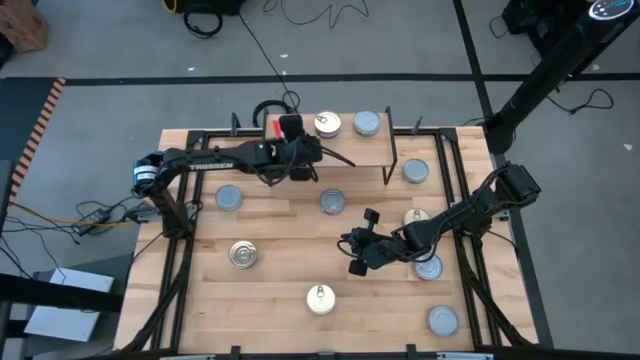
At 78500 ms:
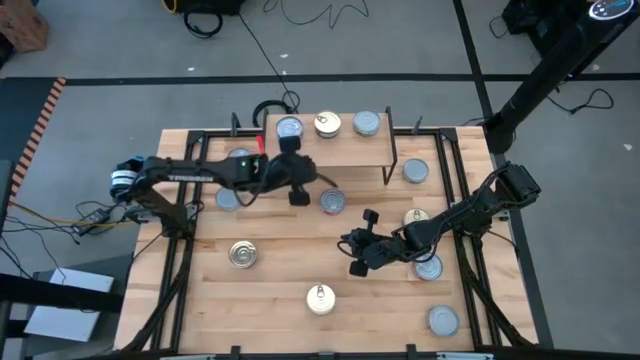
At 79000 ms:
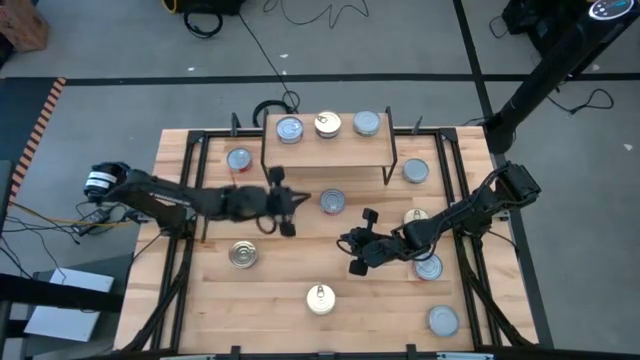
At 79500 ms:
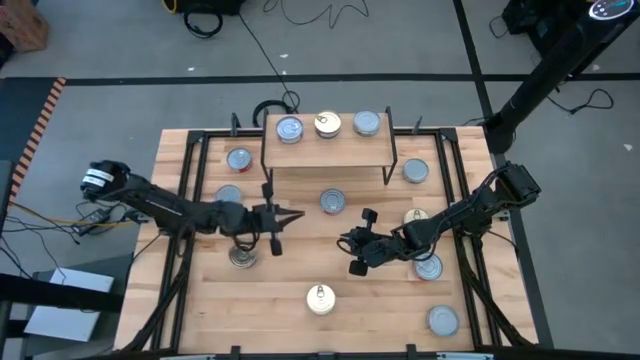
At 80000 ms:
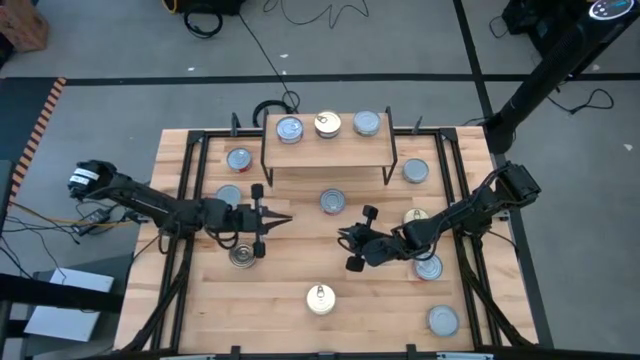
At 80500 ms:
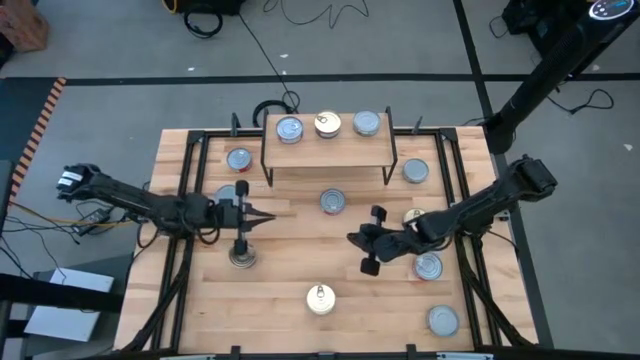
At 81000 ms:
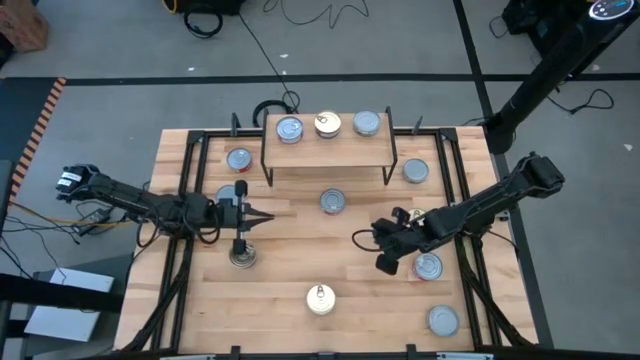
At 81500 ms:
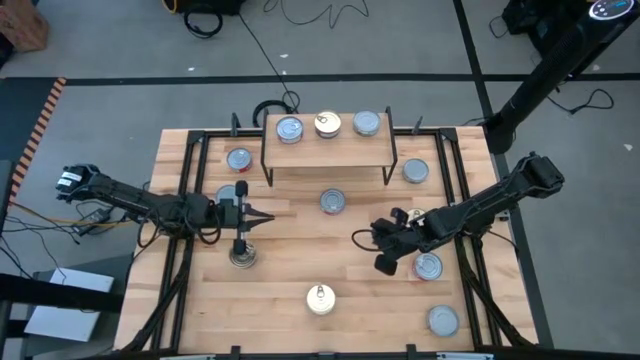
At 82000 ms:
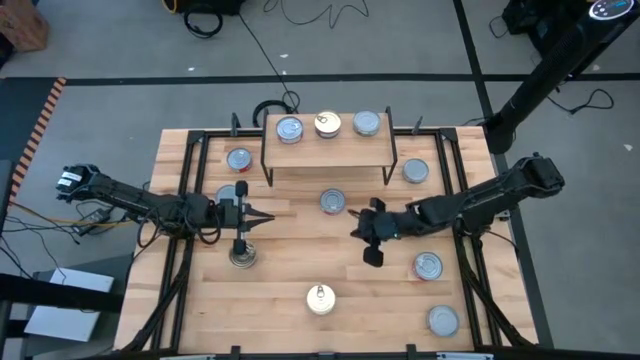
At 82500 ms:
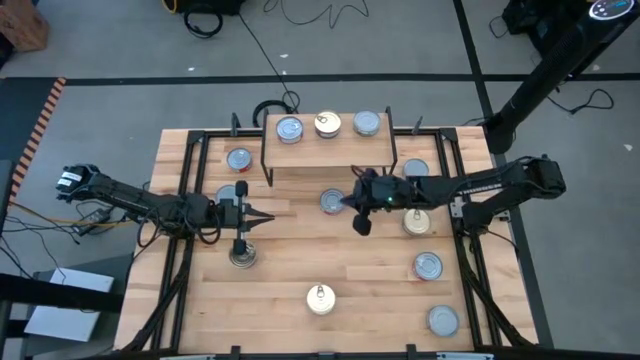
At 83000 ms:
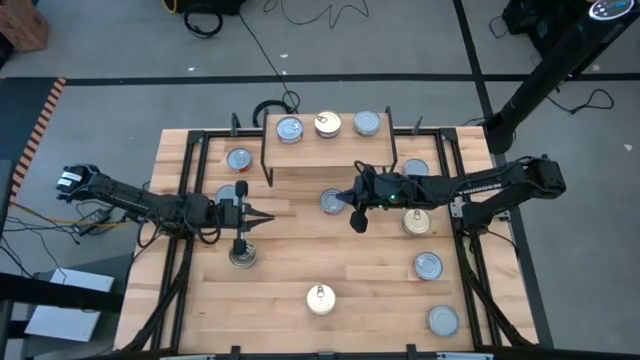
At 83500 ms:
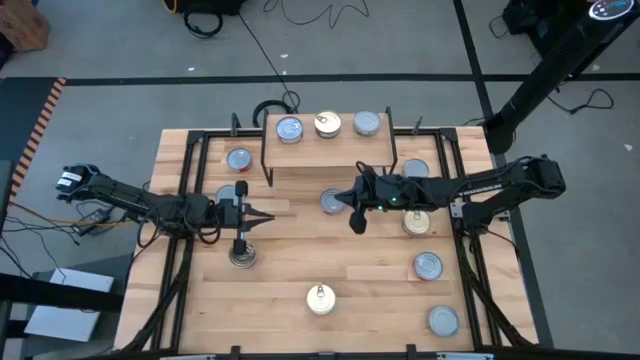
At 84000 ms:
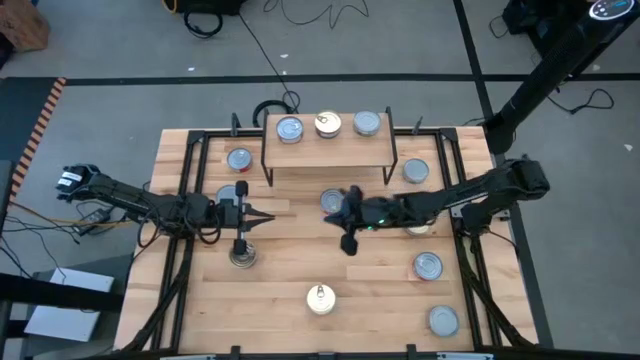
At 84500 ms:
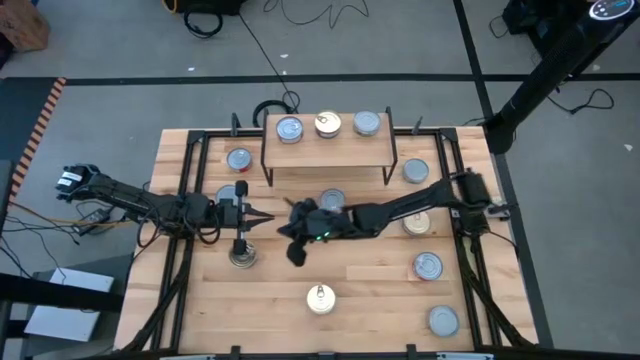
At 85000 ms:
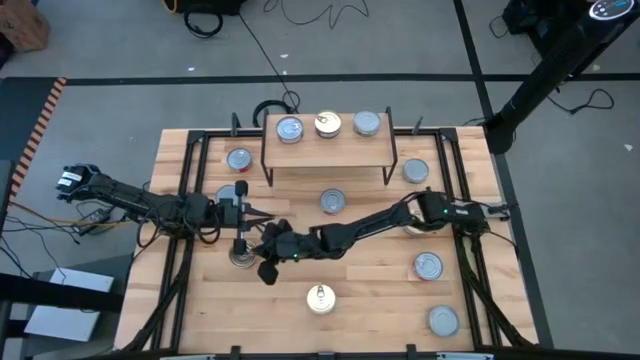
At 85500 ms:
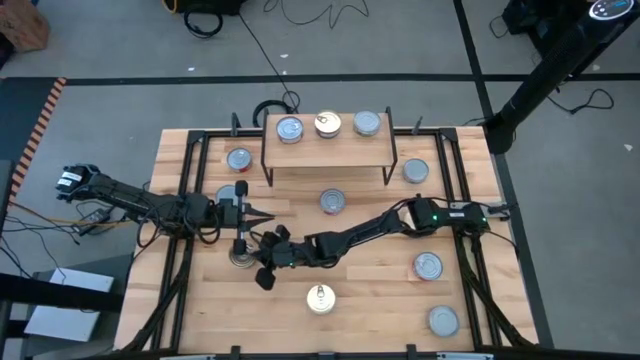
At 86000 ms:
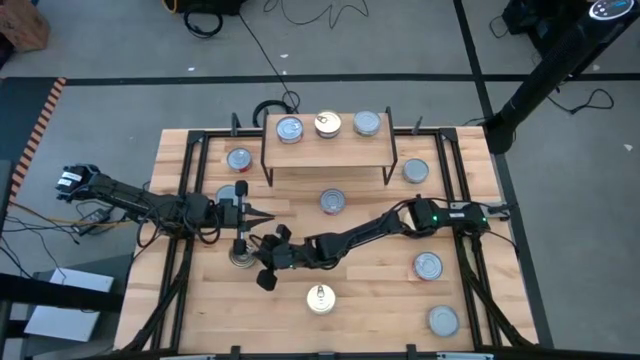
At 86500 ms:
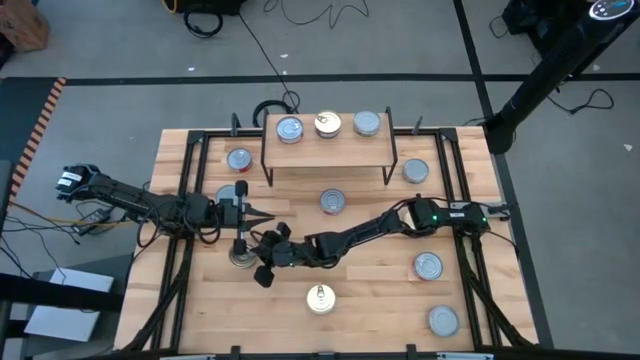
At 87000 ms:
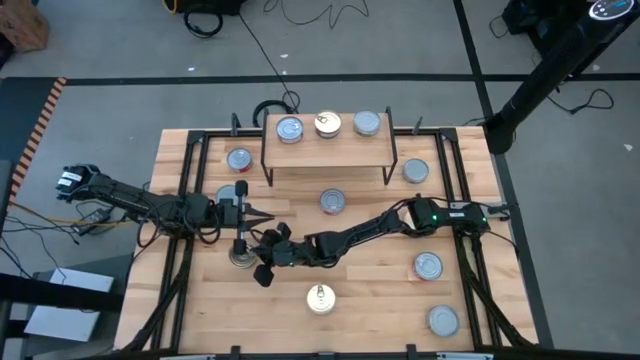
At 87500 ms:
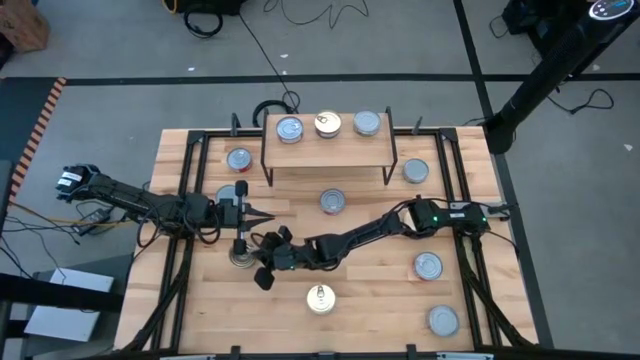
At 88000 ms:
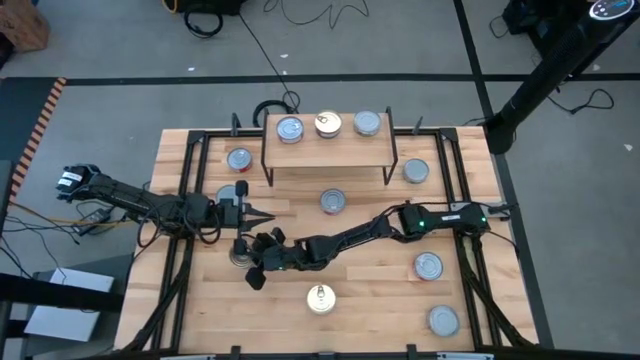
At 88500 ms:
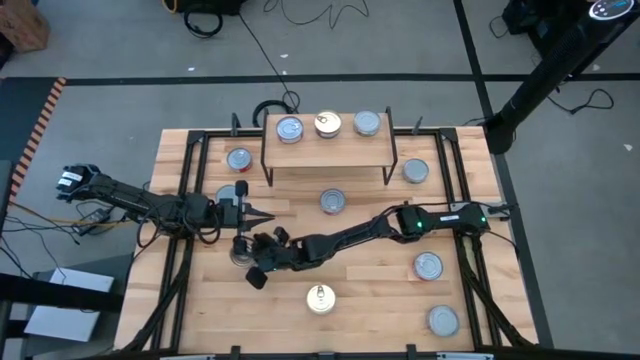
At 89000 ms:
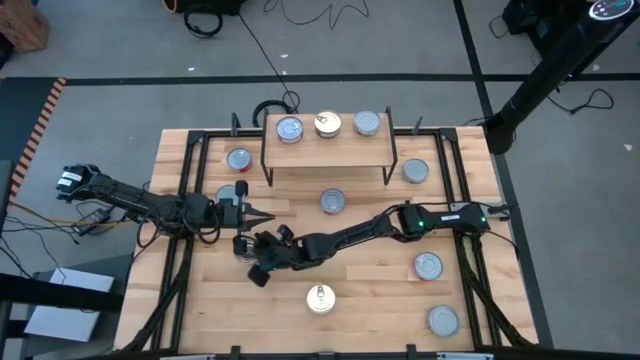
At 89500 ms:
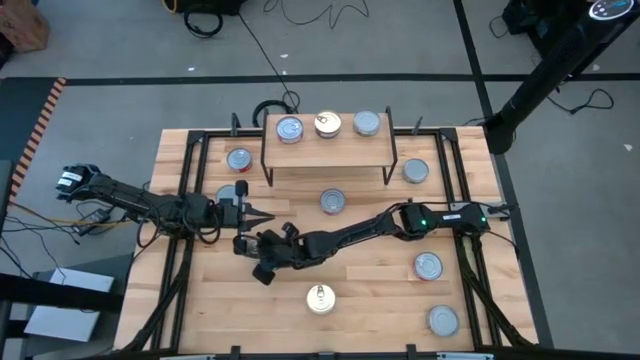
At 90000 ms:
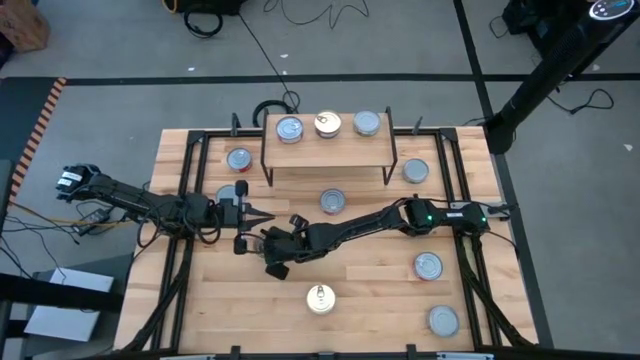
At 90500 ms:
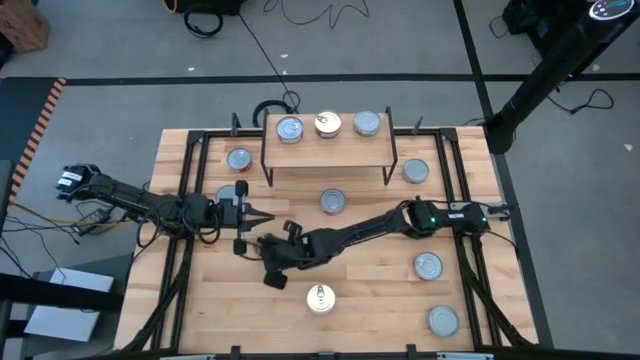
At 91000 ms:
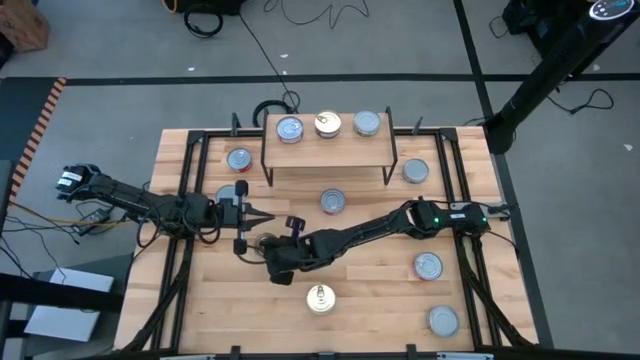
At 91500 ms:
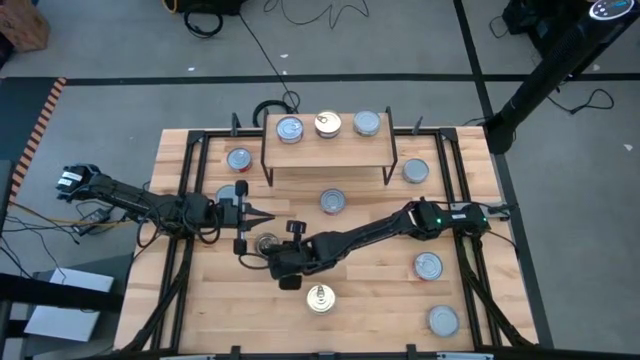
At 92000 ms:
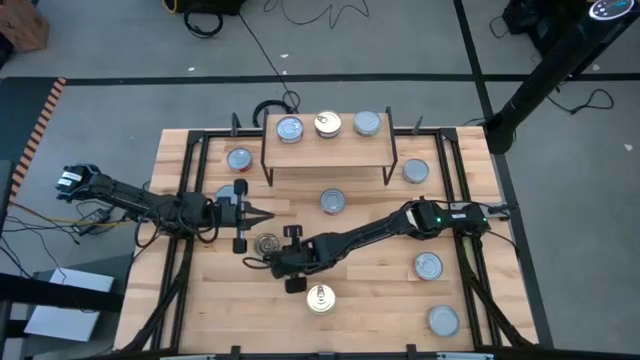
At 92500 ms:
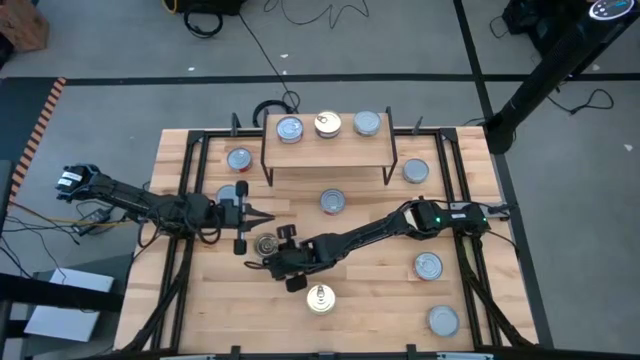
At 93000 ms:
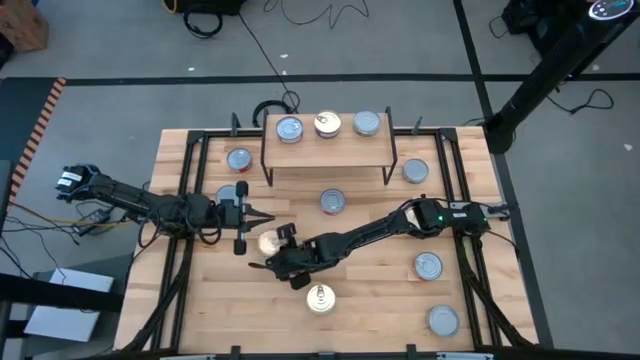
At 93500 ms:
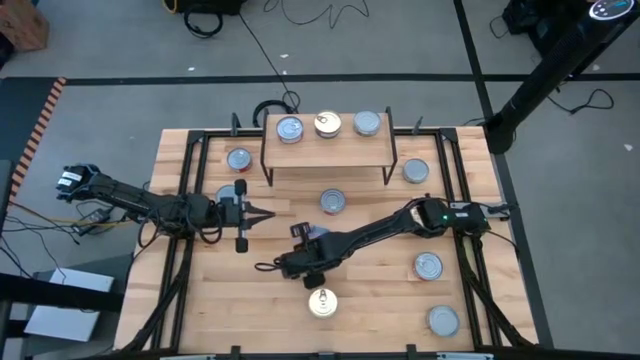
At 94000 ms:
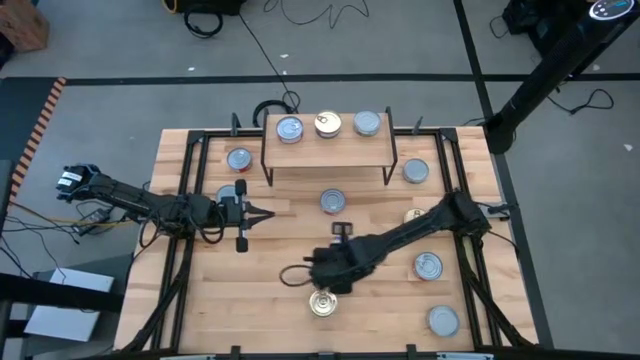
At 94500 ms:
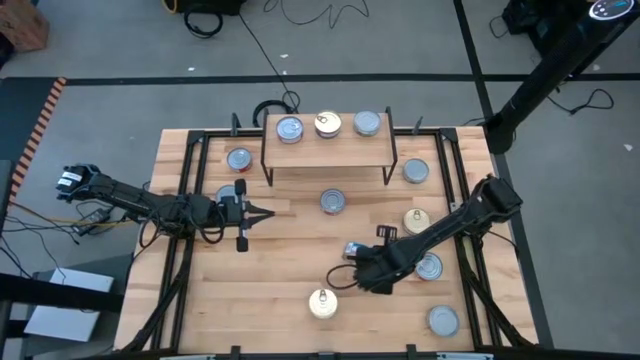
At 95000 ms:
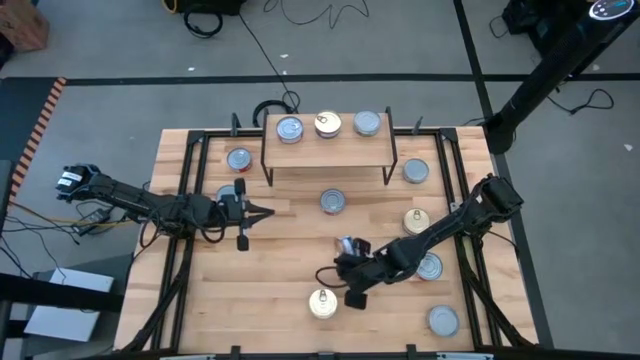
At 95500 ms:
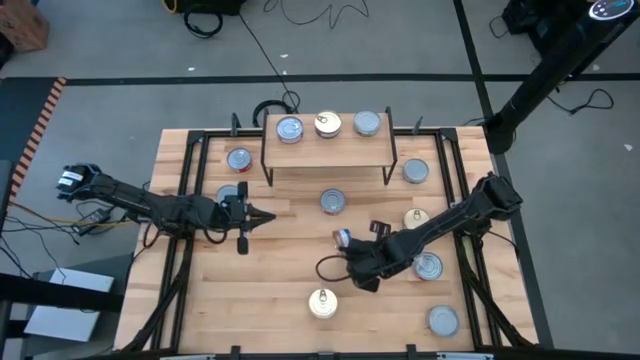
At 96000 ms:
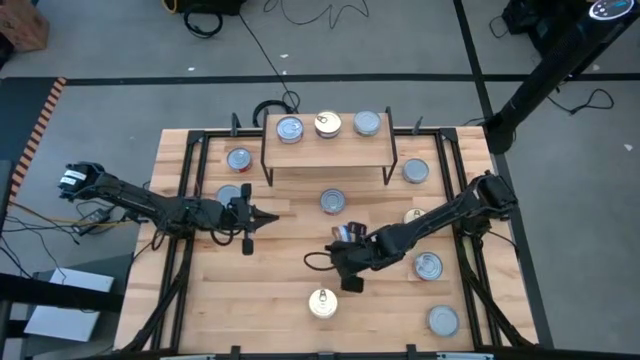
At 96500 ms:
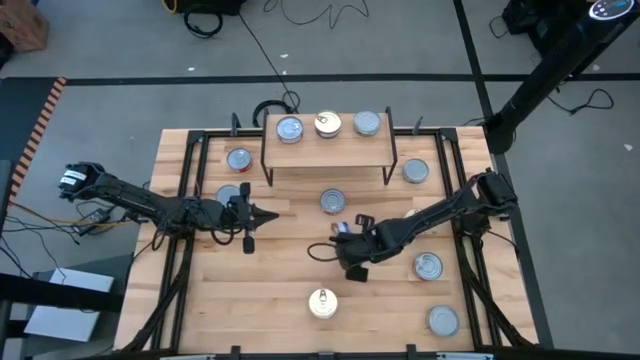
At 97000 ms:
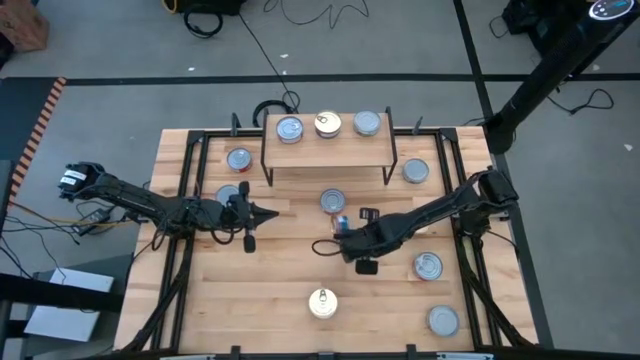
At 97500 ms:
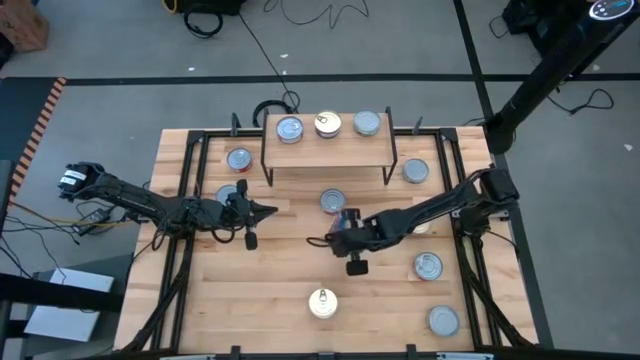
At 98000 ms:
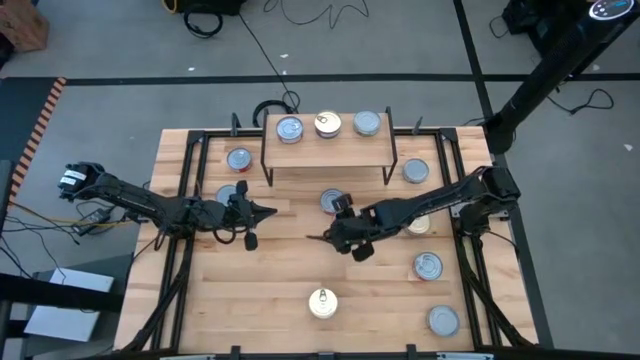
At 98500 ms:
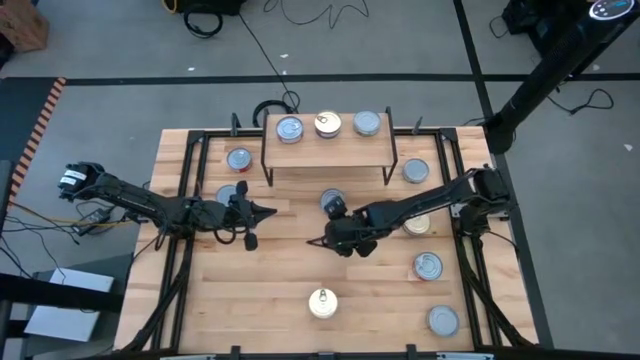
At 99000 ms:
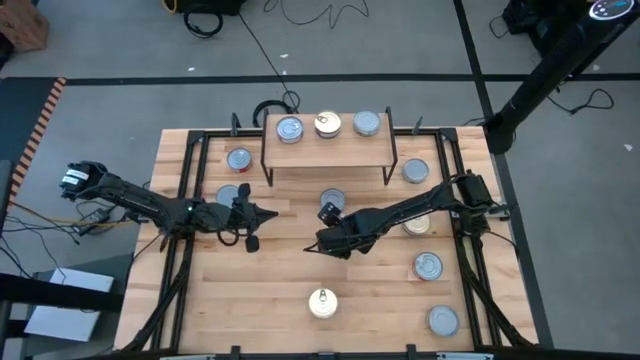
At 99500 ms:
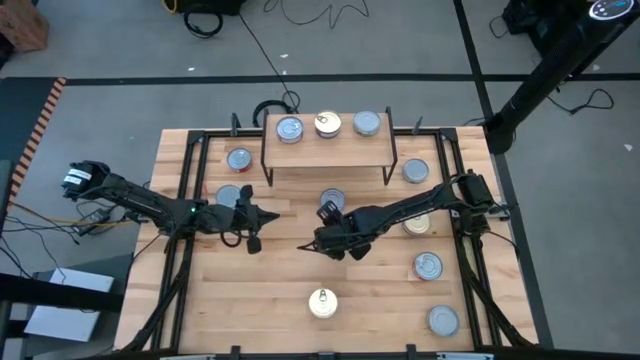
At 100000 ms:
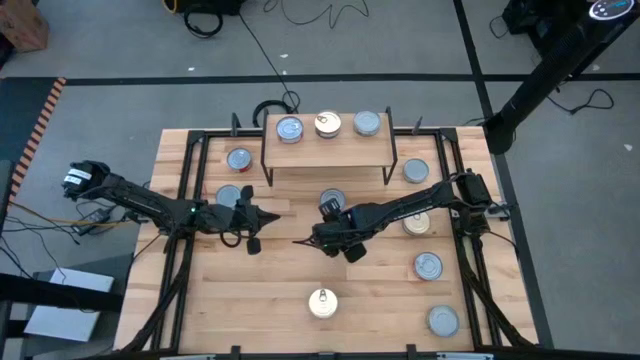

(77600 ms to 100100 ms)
Task: Stack canned seafood by type on shelf
Stack the blue pink tuna can on top of the blue pink tuna can on the shelf
